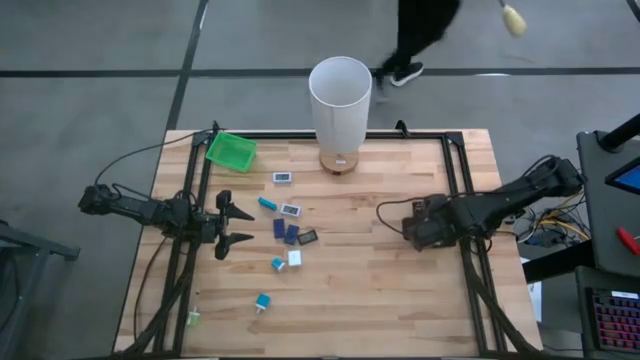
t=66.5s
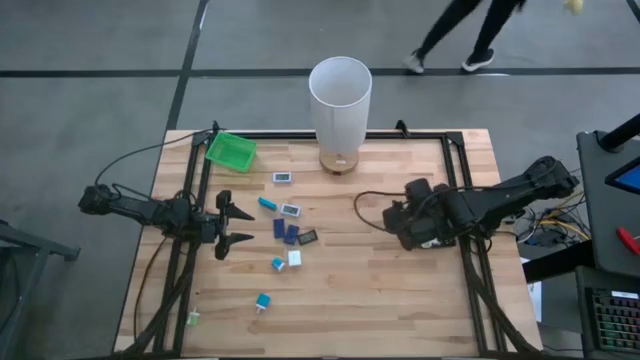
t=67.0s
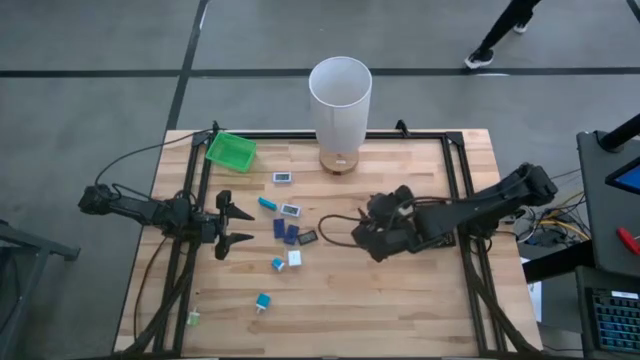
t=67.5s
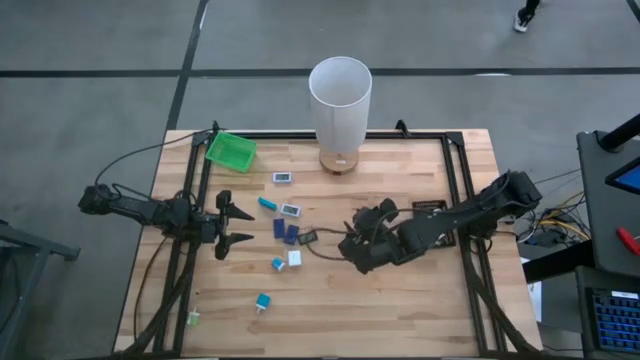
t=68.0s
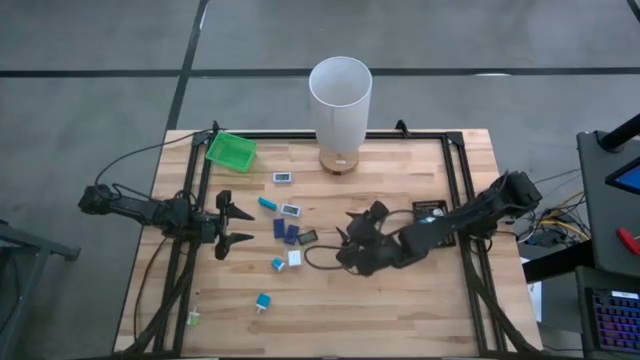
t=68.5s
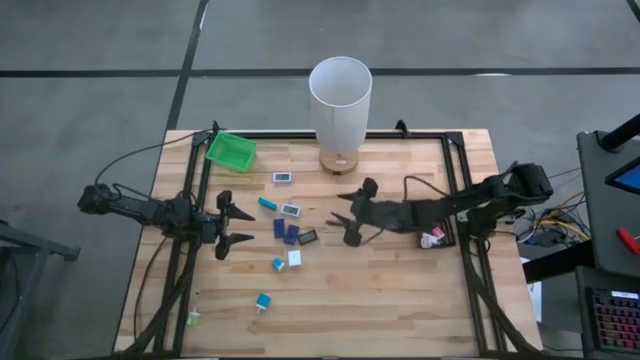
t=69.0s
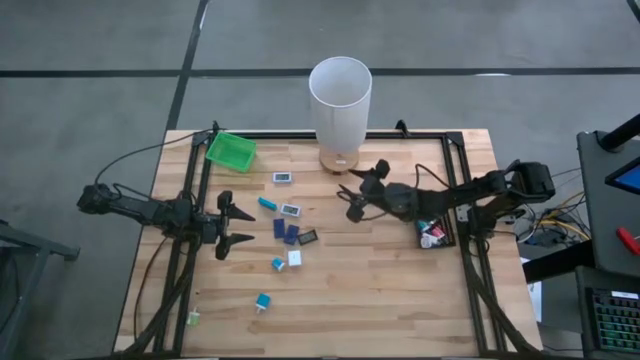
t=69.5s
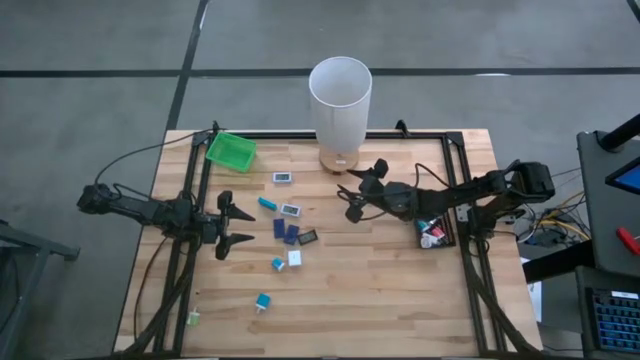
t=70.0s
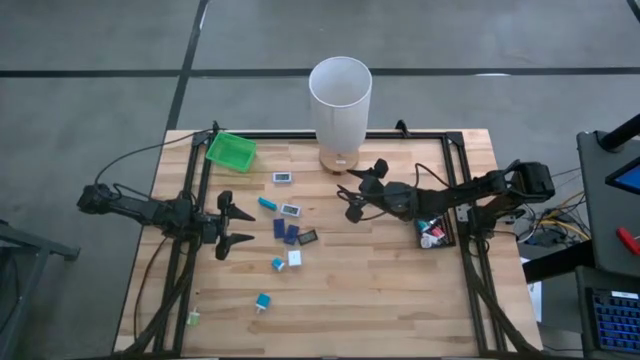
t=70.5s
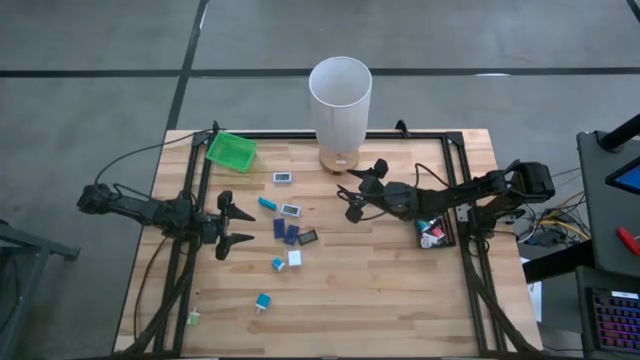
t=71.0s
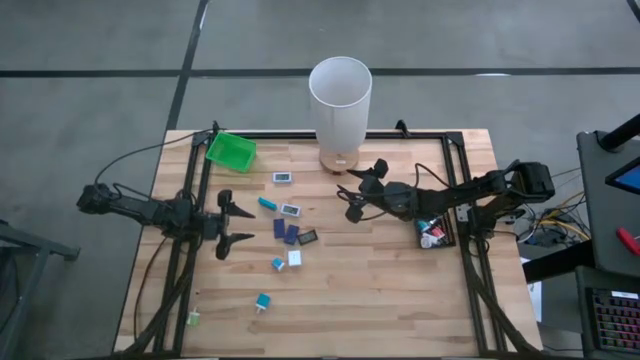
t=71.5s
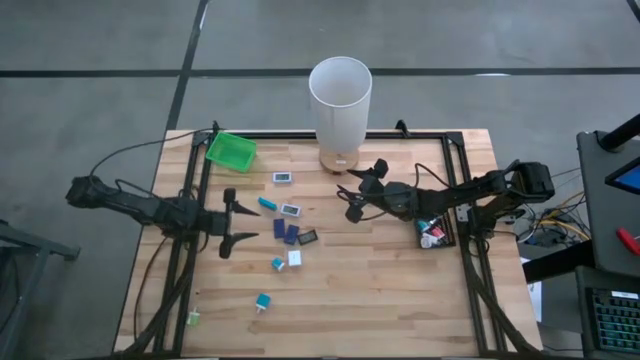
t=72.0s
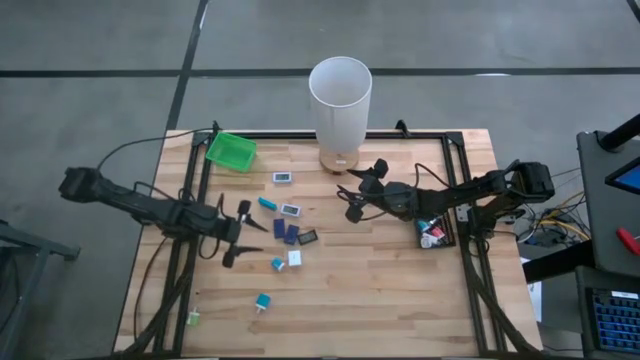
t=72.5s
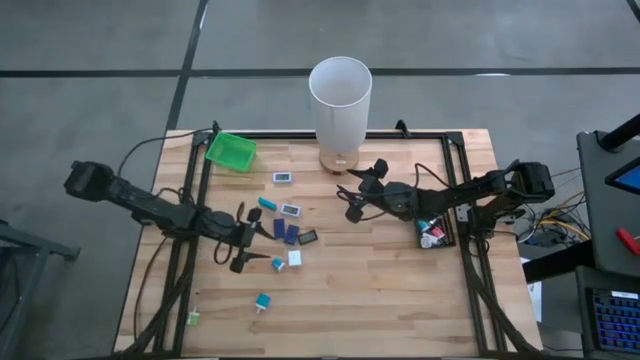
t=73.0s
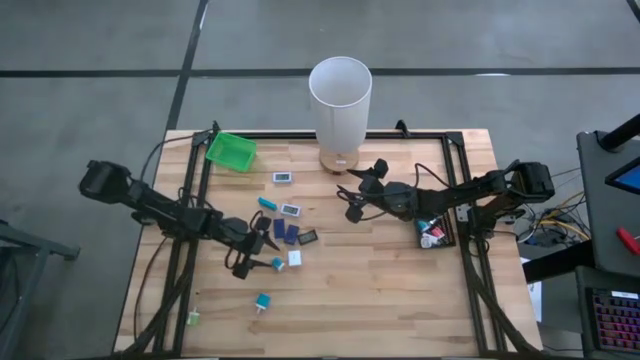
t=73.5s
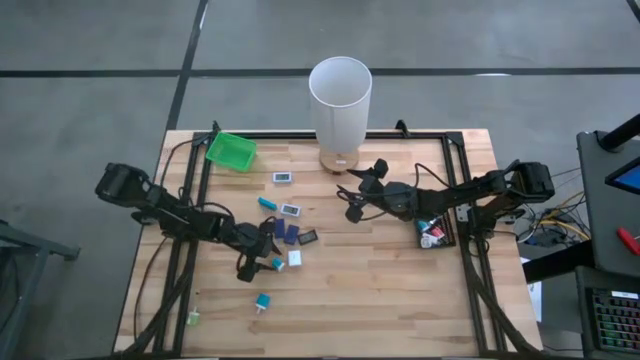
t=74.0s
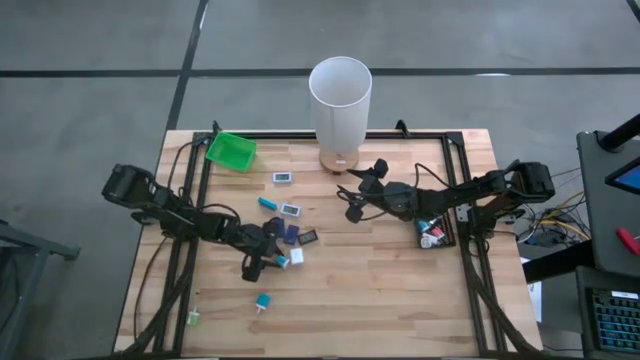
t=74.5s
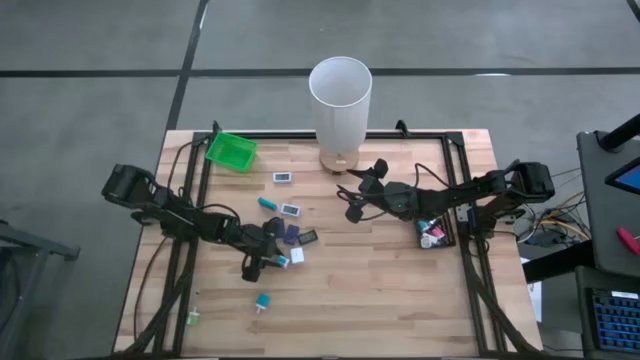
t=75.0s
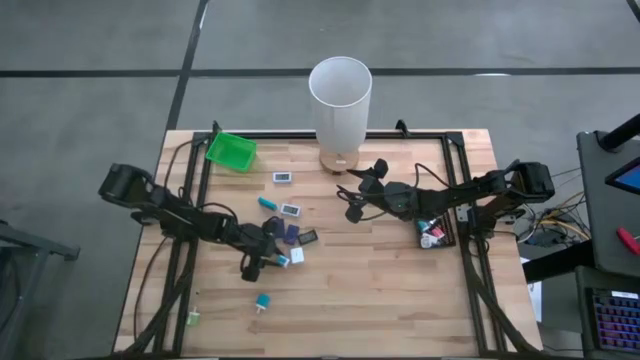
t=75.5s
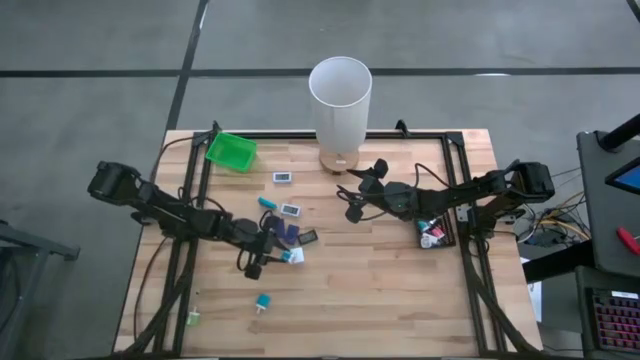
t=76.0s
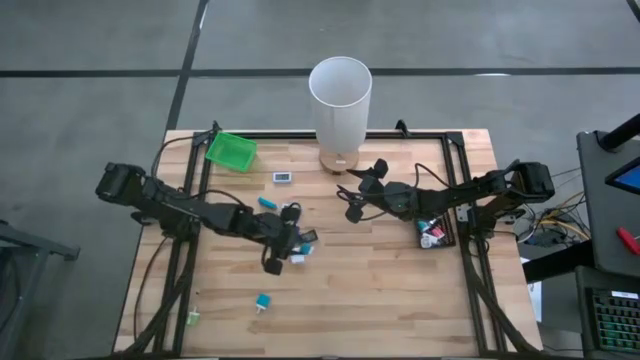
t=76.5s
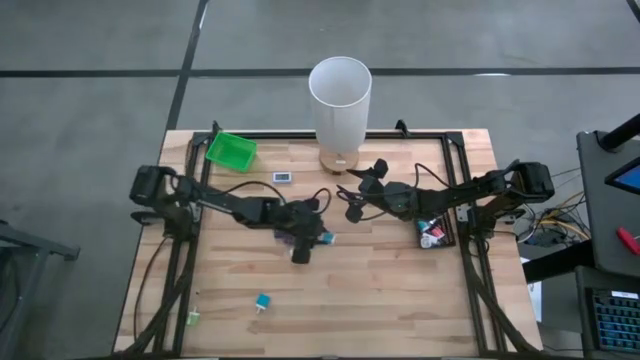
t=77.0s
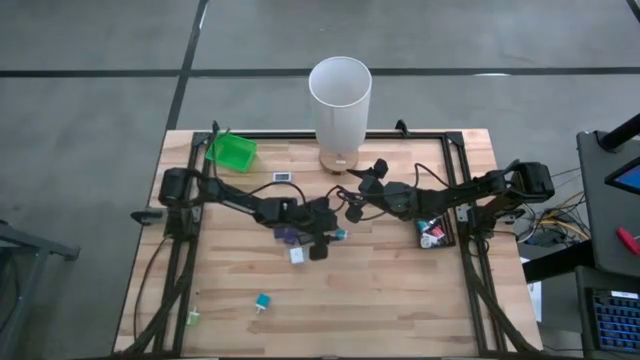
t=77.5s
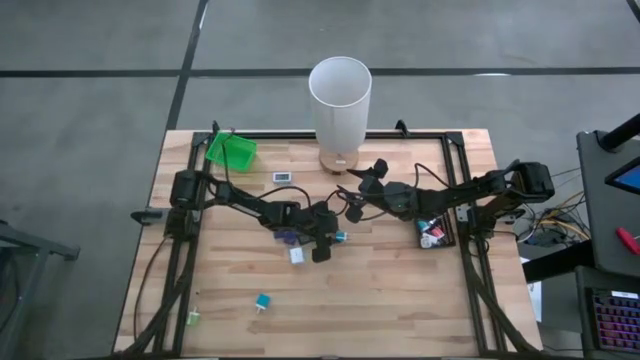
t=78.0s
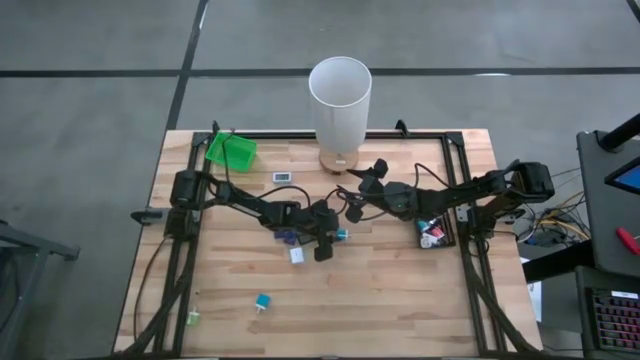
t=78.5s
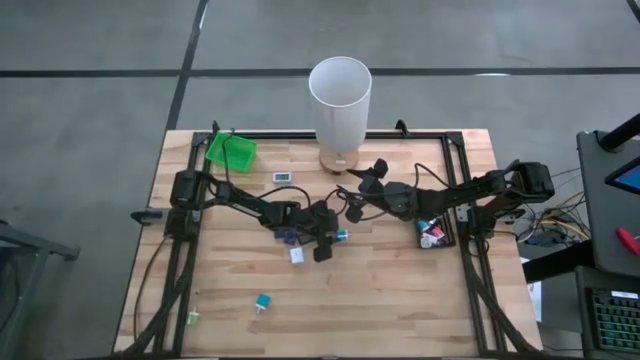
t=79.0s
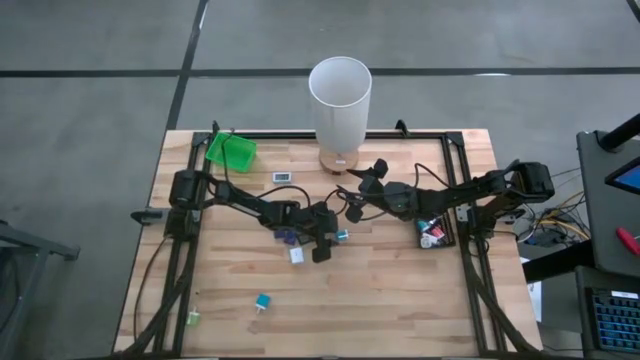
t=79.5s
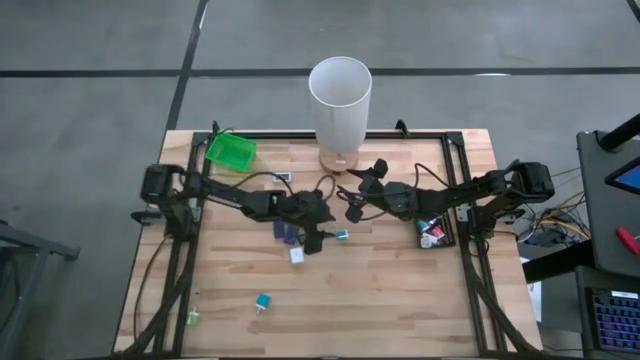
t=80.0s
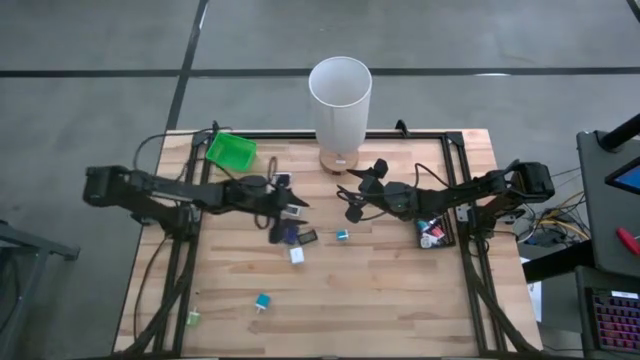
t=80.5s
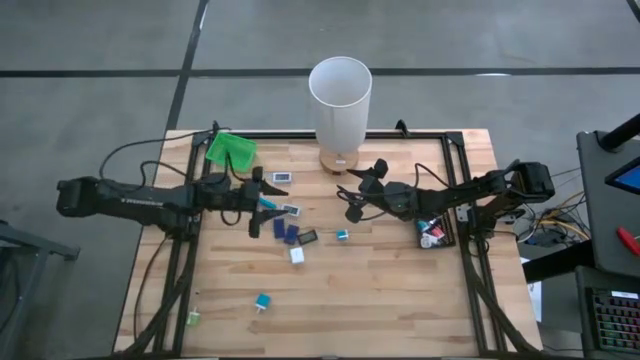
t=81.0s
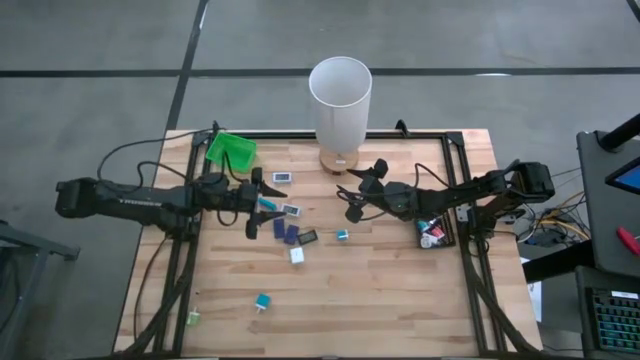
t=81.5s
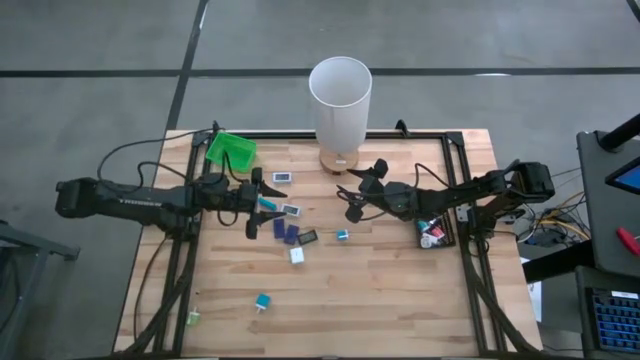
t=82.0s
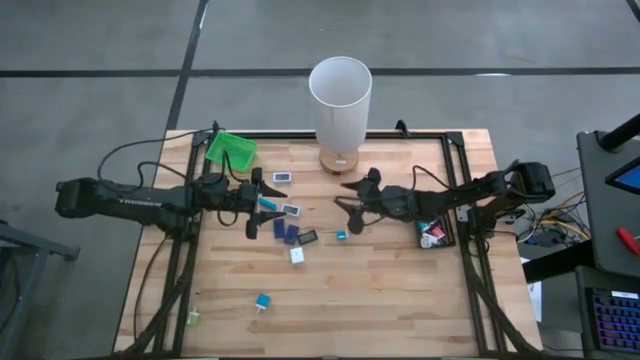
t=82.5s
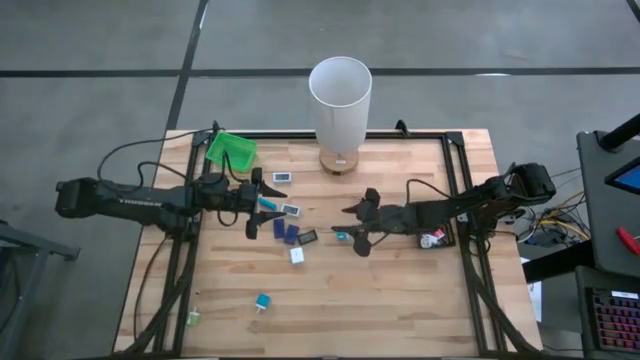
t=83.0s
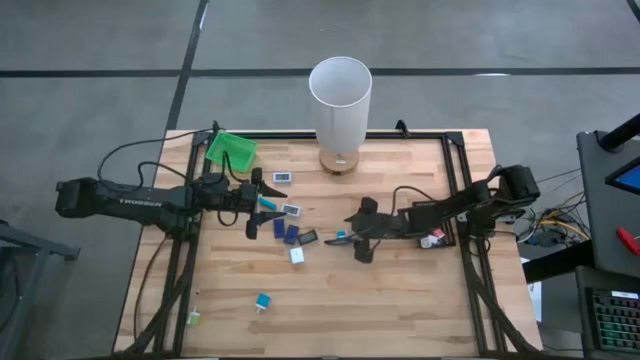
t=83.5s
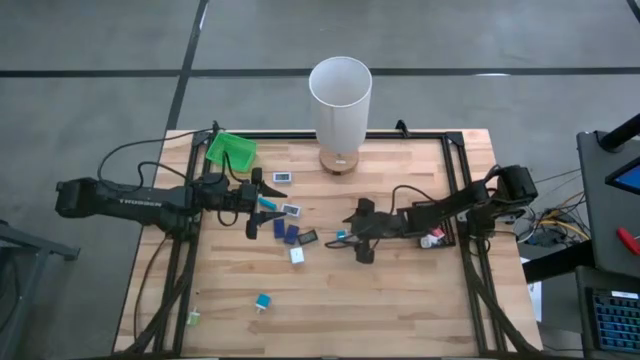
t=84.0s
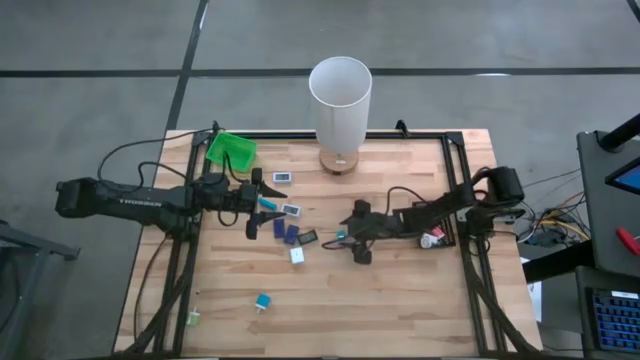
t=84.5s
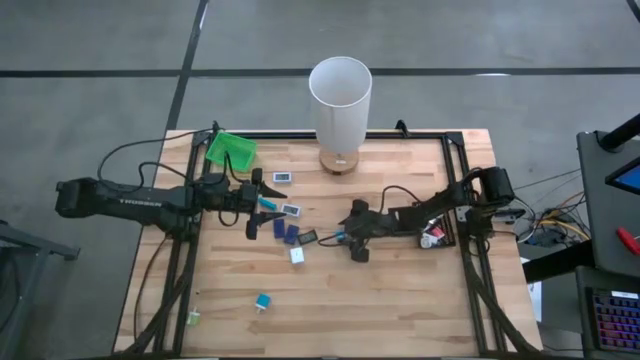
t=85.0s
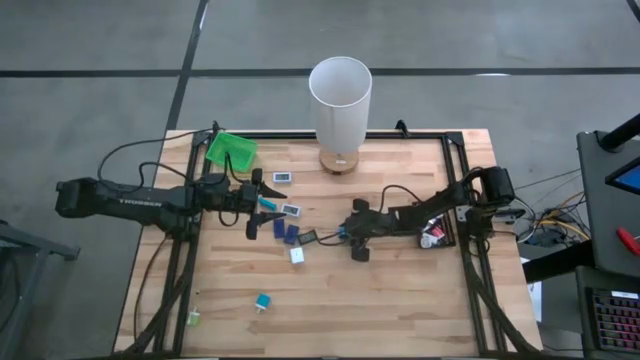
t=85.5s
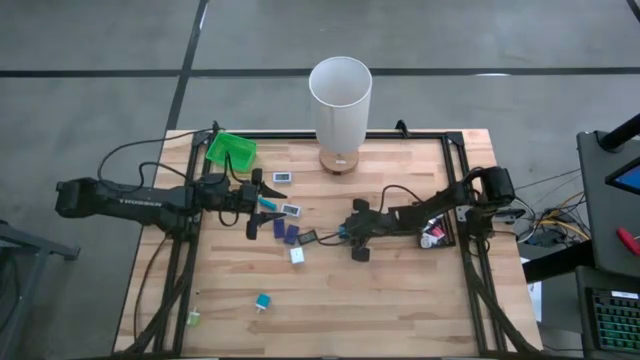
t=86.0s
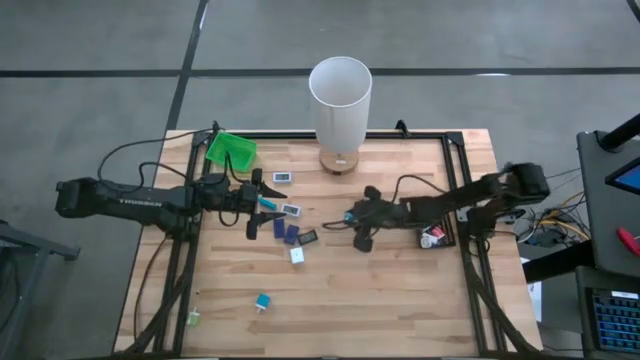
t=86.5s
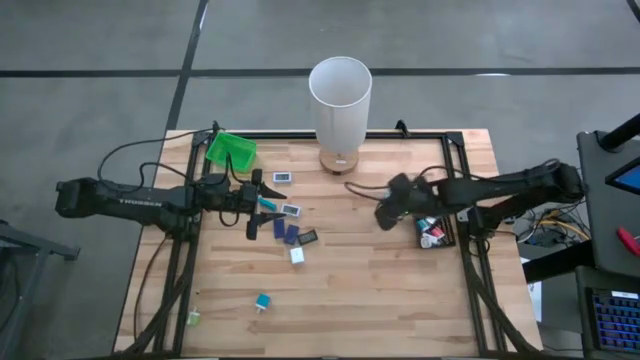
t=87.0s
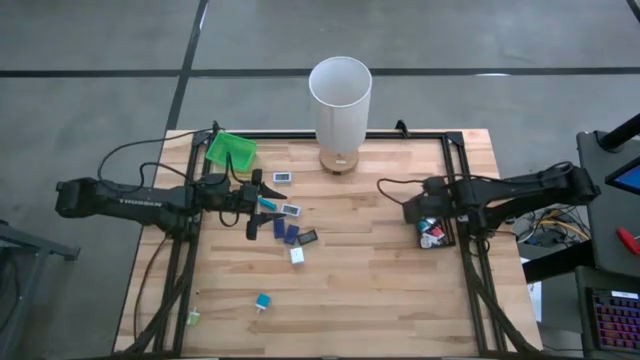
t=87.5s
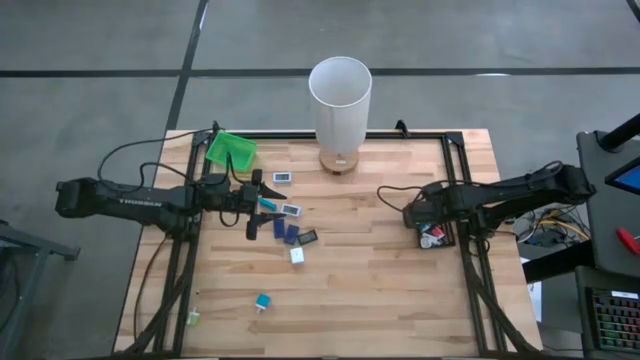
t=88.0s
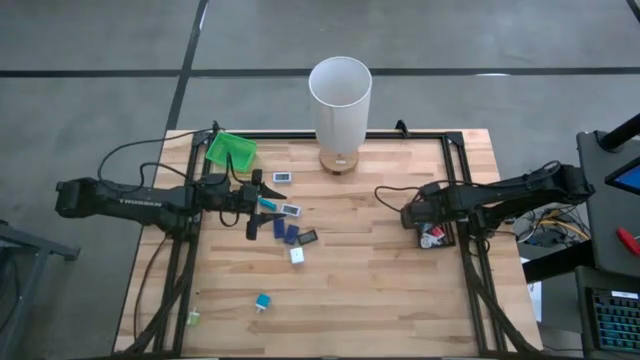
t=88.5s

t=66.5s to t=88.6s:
Task: Pick & Place Office items
Put the top blue charger adapter into the black bin
